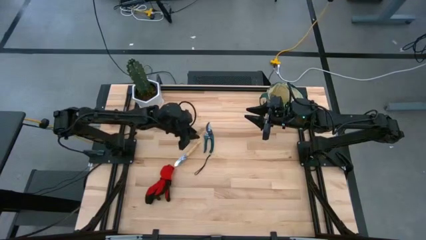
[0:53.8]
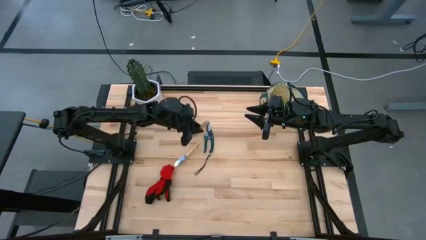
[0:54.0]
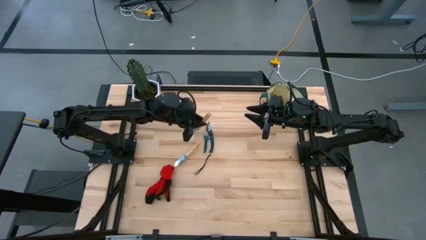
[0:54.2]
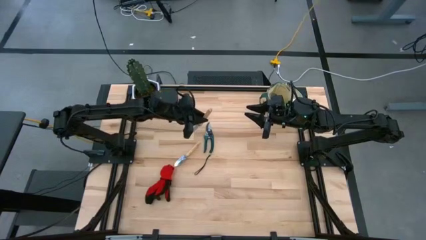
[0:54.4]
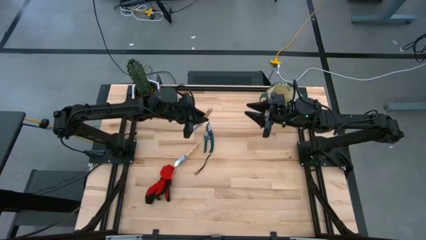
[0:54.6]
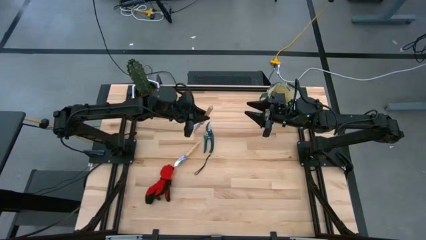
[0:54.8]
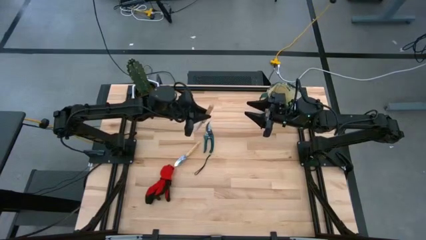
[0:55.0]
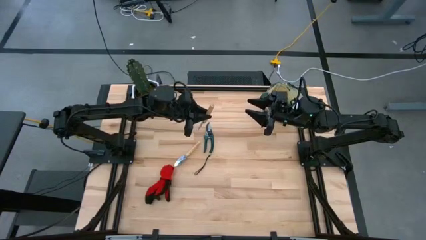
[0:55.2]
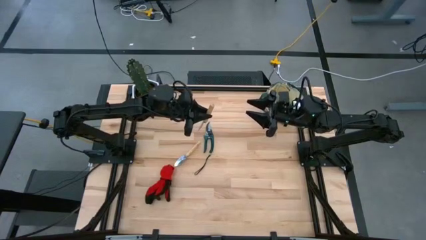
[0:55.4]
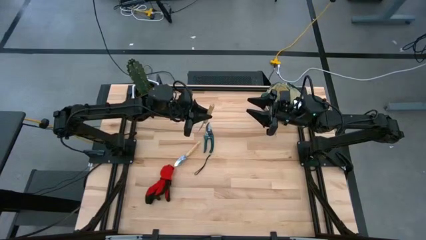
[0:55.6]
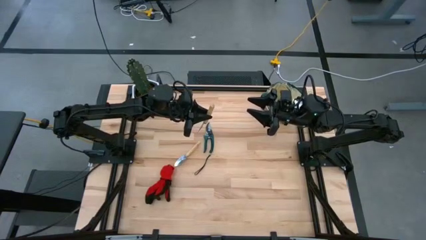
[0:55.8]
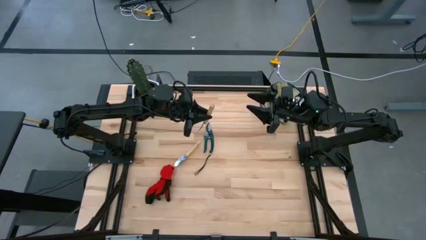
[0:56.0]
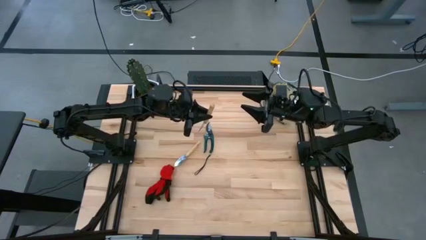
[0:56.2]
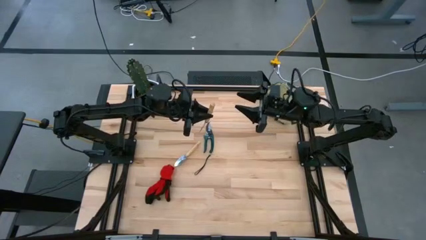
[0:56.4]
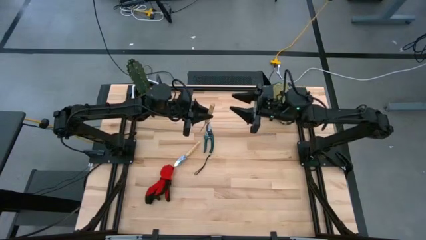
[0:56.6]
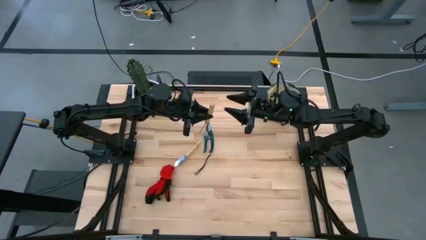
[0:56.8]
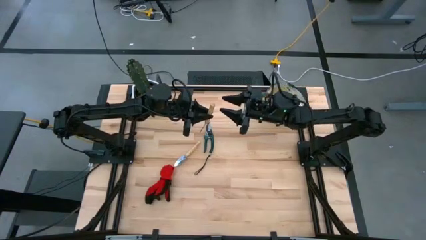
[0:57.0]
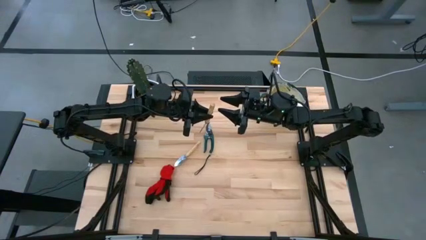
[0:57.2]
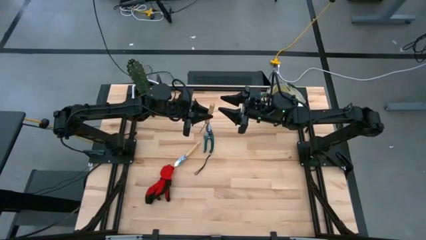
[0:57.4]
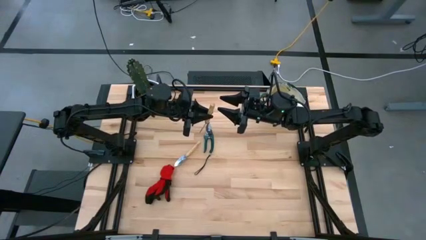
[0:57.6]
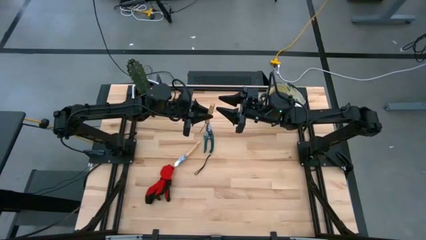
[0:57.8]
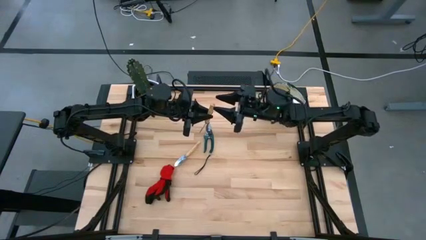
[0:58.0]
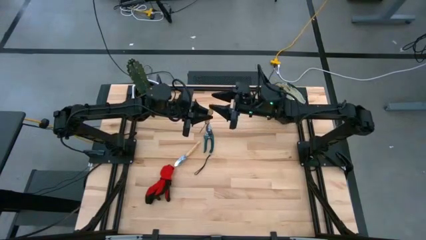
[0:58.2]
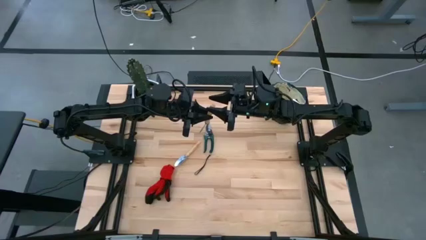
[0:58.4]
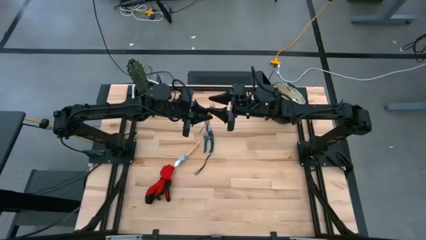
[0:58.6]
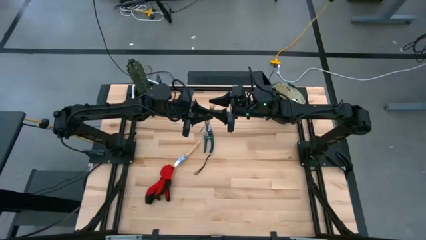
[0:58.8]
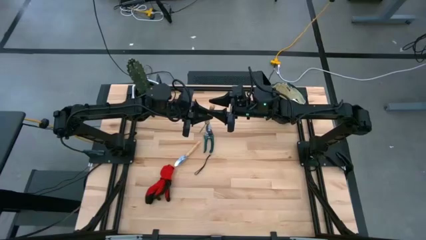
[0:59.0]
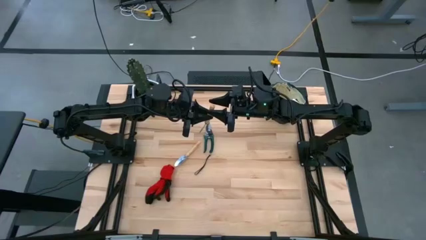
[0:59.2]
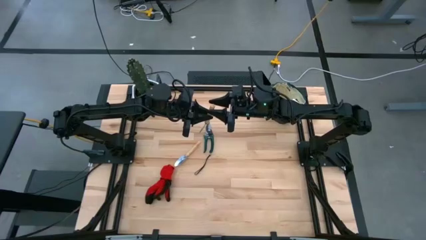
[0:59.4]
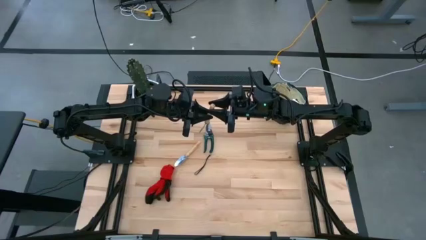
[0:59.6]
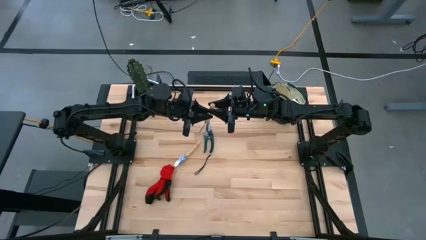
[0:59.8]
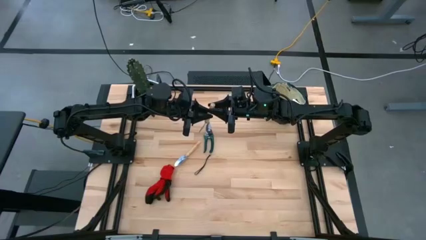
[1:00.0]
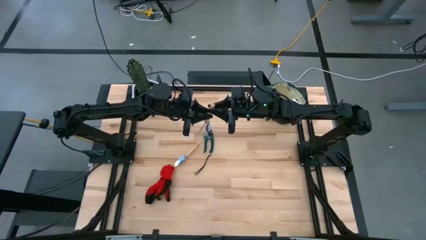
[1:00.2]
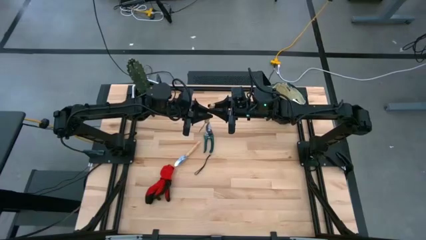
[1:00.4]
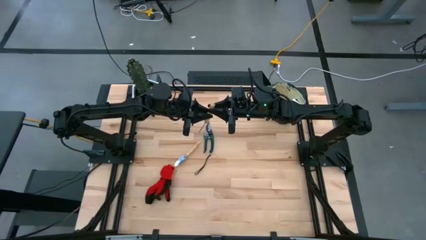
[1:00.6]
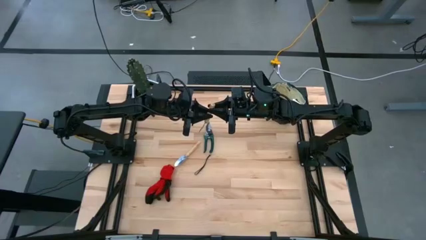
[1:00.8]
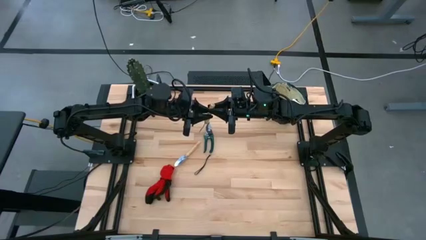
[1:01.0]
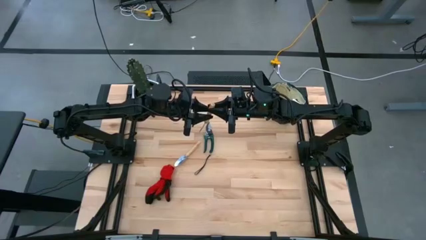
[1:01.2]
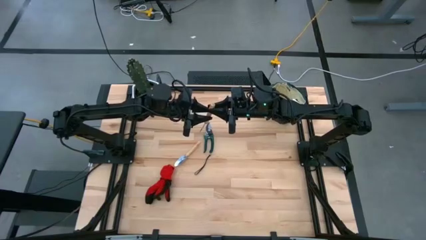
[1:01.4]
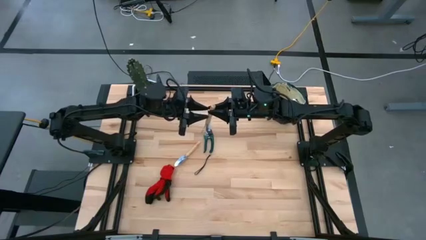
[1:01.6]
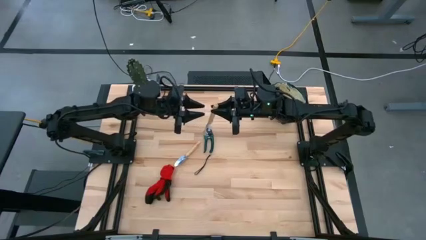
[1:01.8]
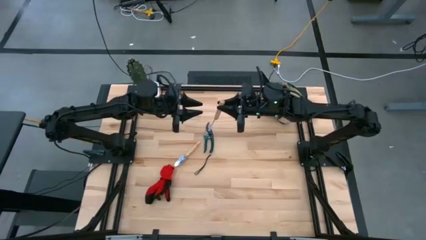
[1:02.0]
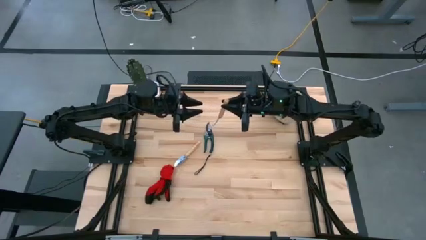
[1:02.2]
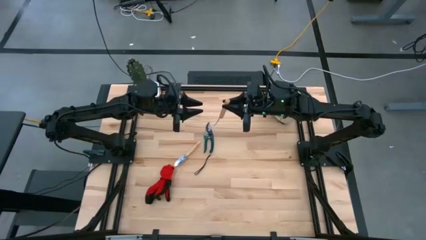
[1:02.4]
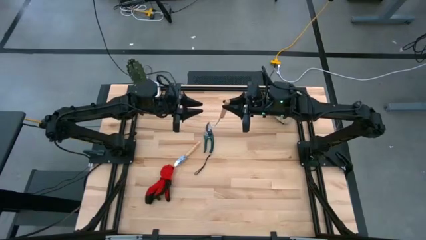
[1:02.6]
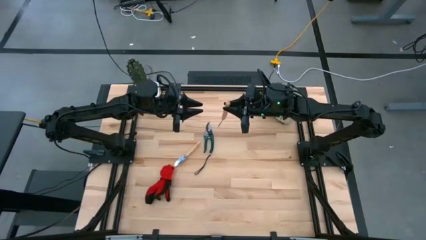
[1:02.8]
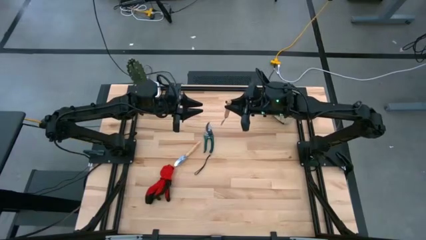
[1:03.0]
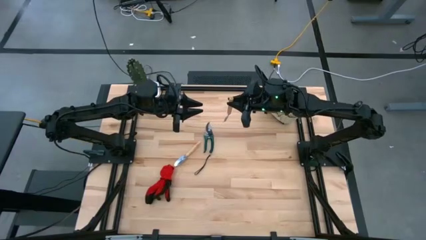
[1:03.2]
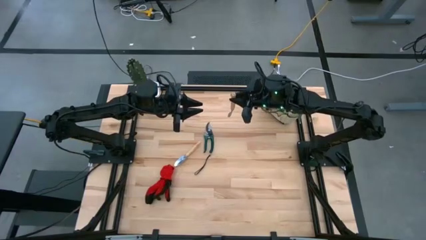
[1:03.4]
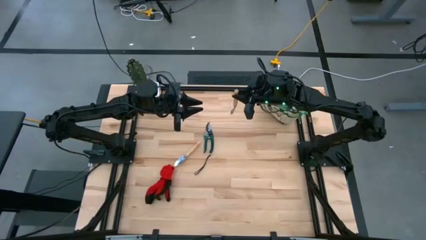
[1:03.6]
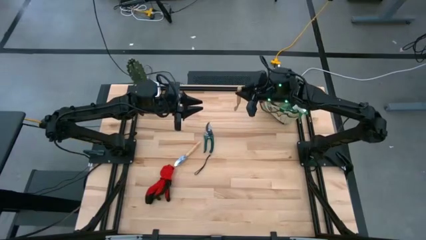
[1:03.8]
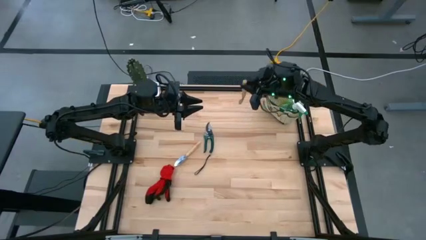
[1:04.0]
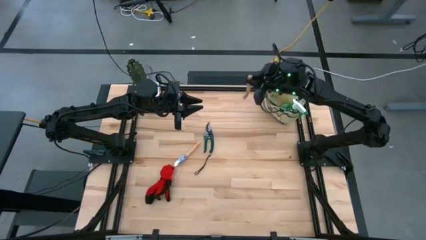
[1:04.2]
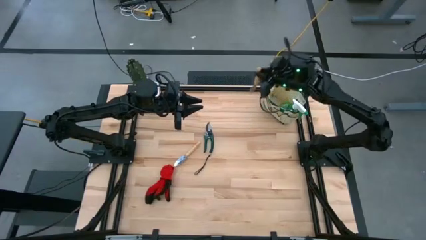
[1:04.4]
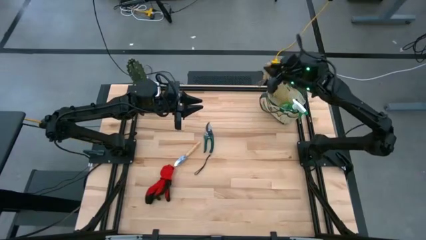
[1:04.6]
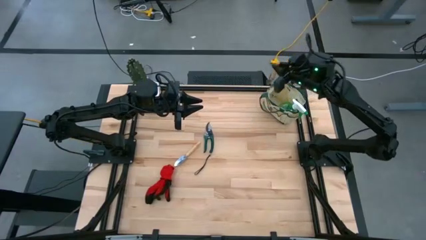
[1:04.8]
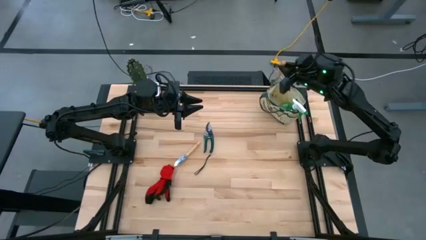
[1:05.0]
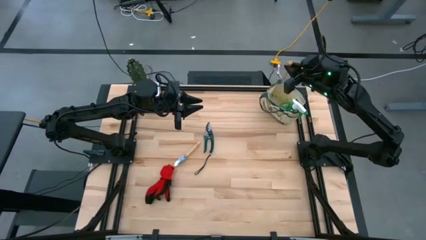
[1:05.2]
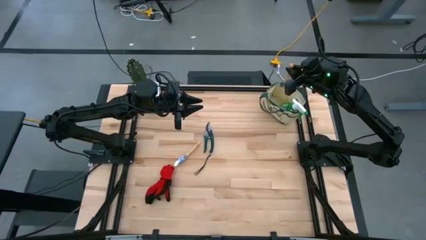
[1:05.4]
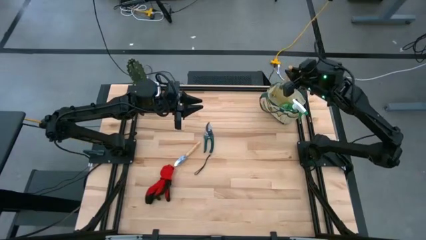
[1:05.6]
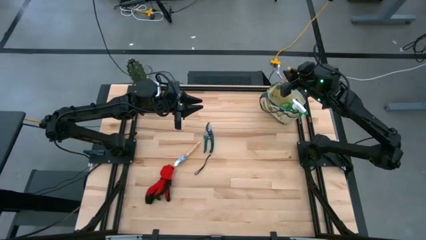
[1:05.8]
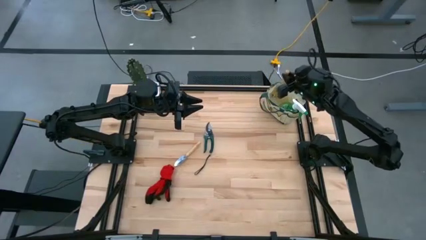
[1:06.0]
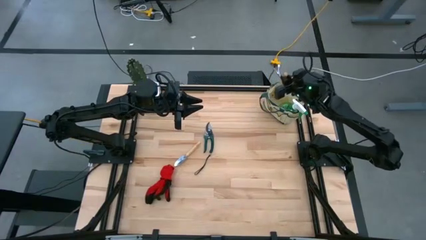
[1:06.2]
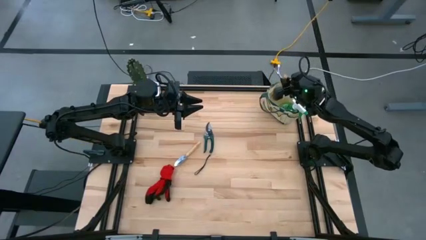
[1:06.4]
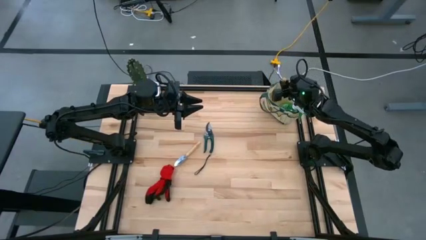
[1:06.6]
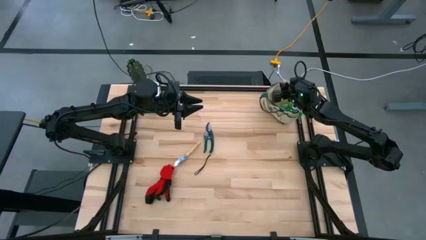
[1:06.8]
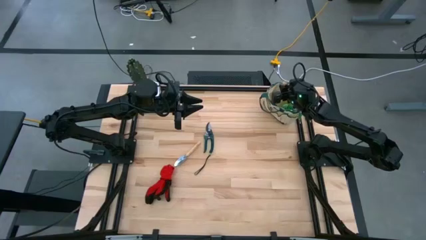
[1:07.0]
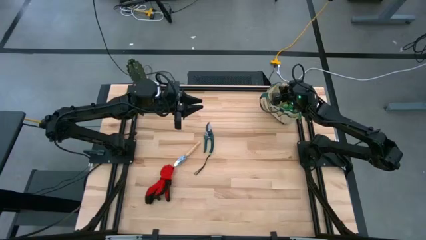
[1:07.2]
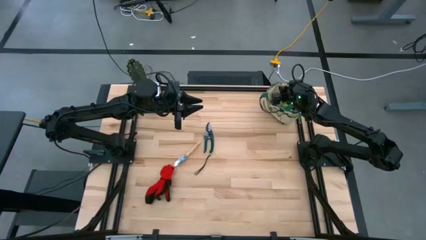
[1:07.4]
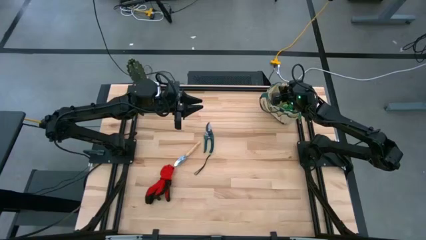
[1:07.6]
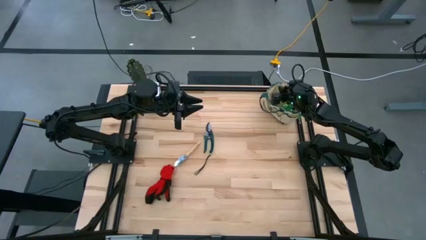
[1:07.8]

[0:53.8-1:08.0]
Task: Pick & Place Garden tools in Gardening bag
Put the left brown trowel into the white gardening bag

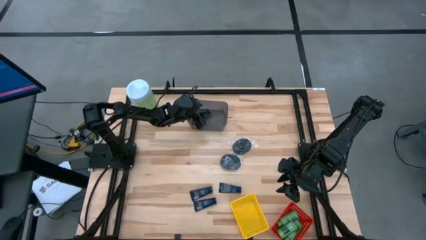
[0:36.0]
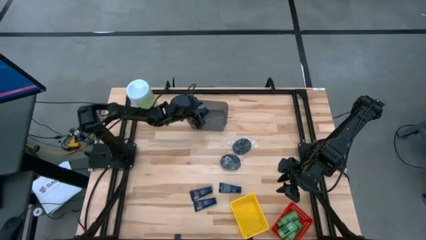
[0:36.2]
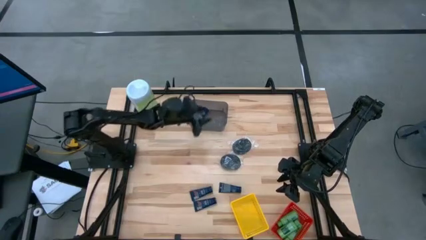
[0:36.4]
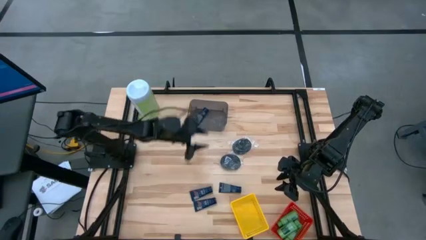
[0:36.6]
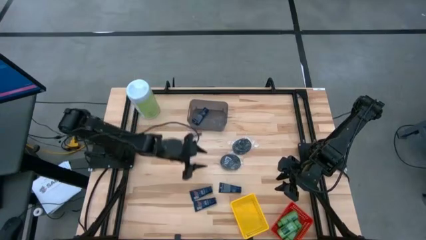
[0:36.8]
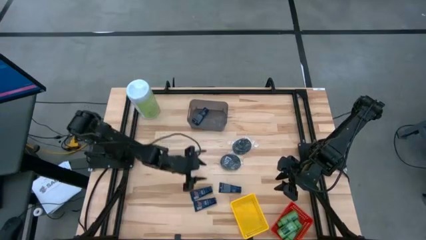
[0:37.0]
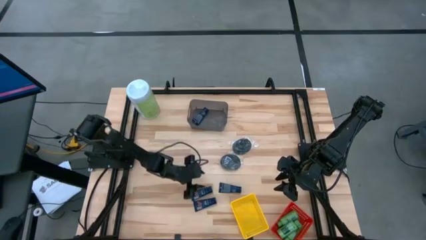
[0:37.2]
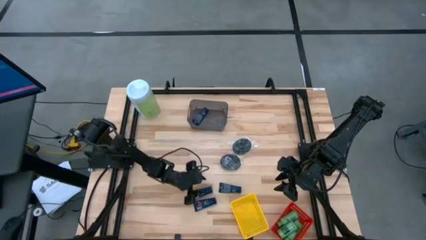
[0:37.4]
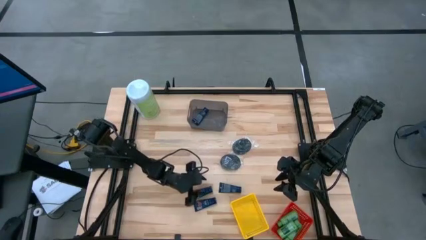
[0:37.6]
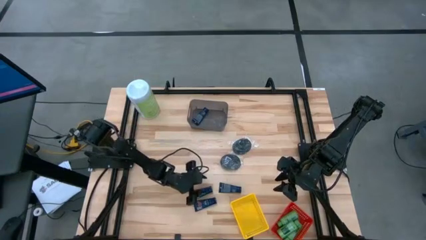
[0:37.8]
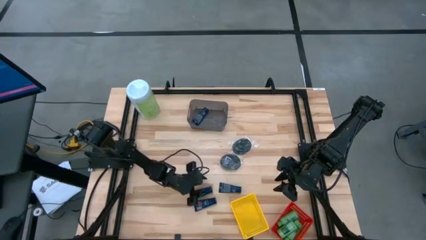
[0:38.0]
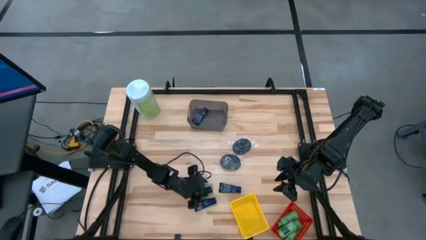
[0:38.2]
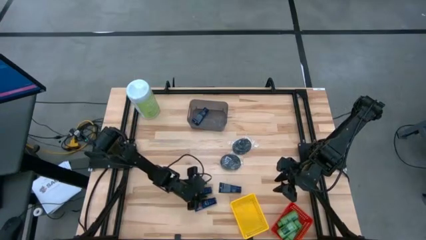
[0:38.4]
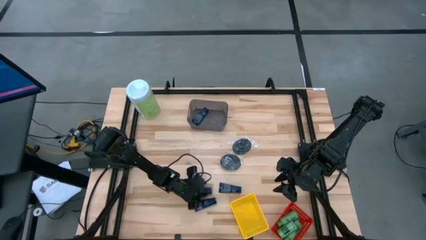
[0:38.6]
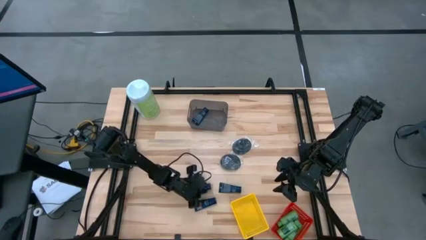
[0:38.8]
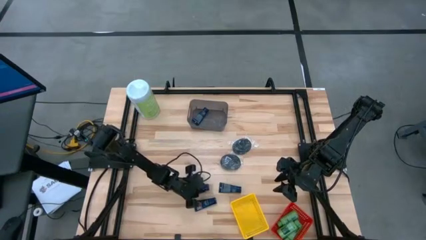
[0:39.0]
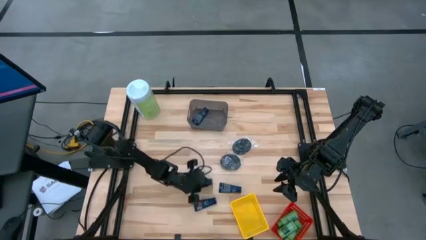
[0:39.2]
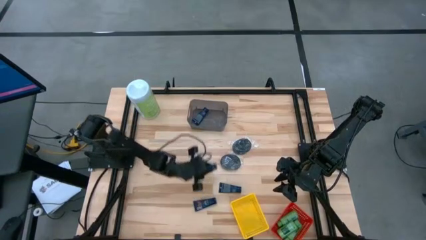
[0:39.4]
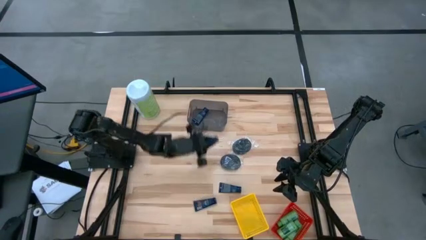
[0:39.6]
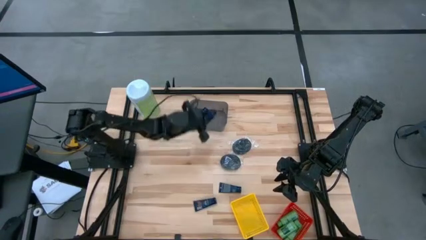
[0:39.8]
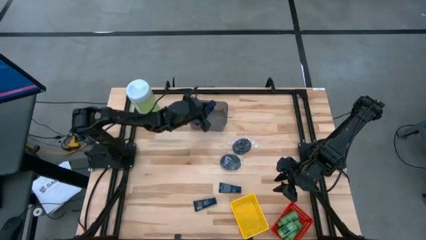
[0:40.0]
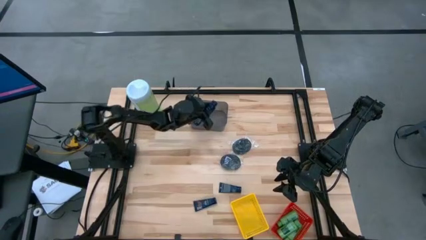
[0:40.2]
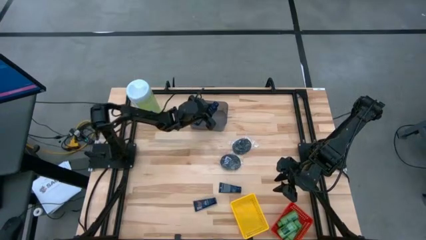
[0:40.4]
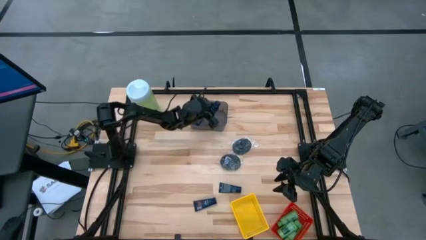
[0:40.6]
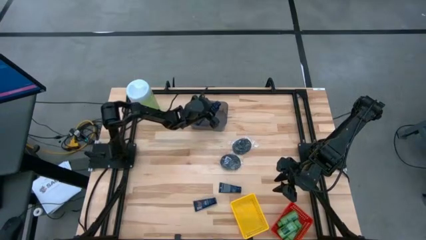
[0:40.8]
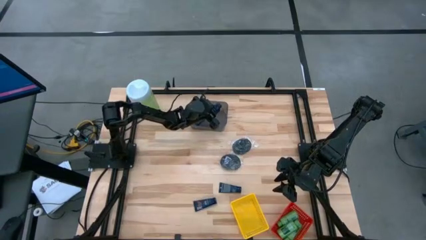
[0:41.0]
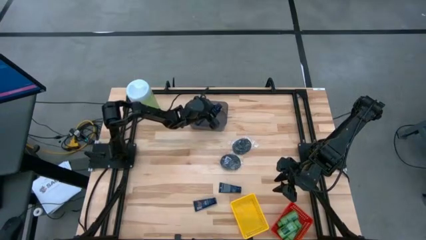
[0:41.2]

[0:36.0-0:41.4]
Task: Pick & Place Travel size toiletries
Put the black shave cream on the black bin
